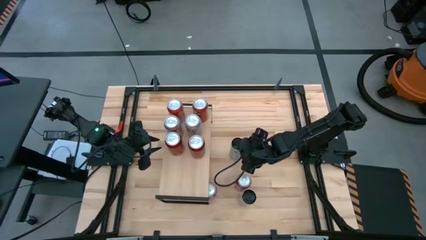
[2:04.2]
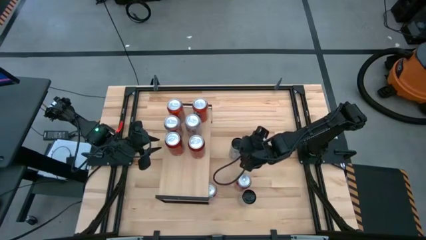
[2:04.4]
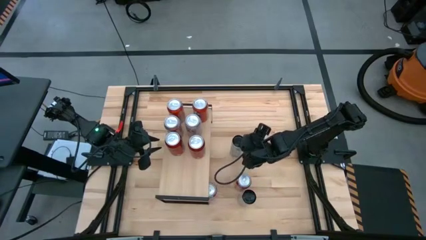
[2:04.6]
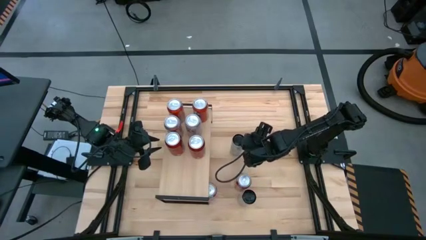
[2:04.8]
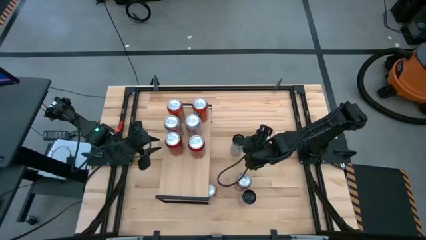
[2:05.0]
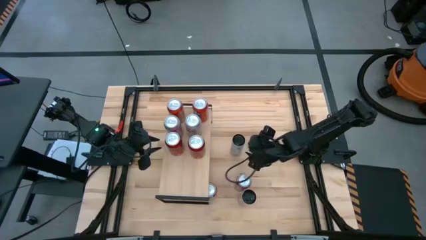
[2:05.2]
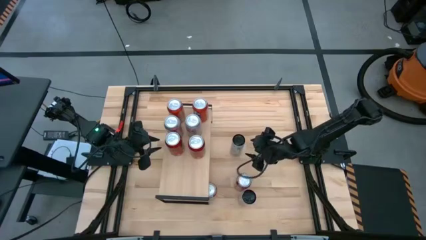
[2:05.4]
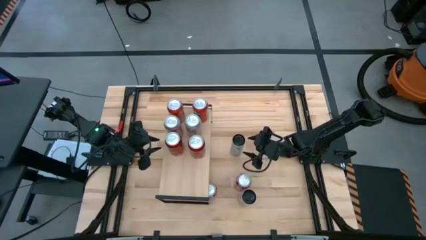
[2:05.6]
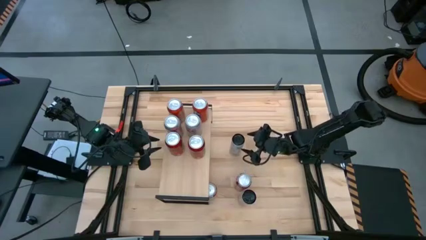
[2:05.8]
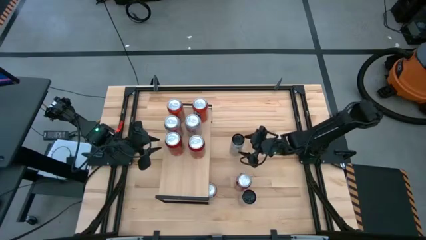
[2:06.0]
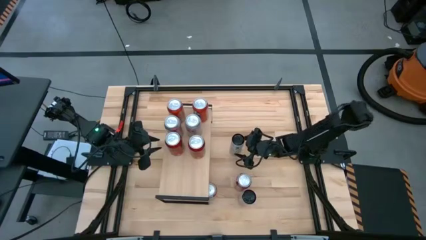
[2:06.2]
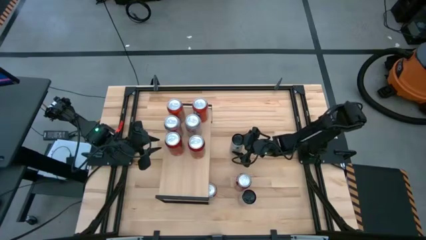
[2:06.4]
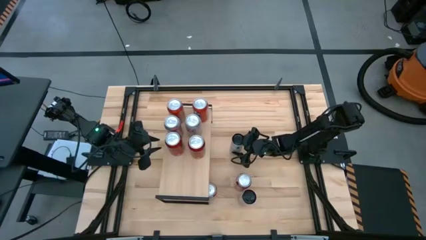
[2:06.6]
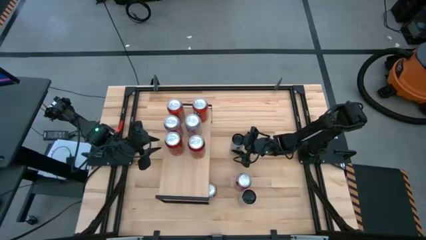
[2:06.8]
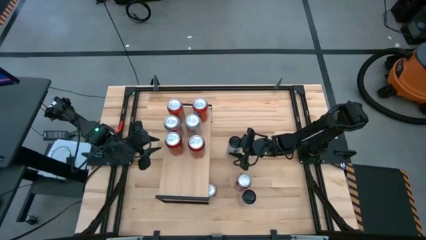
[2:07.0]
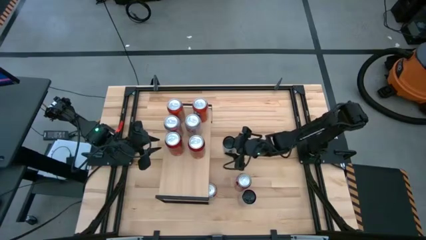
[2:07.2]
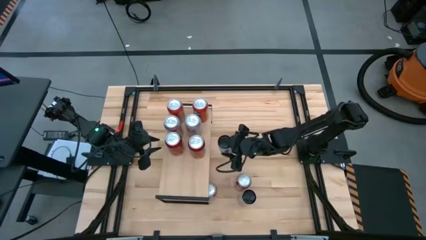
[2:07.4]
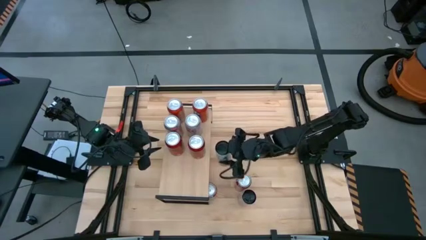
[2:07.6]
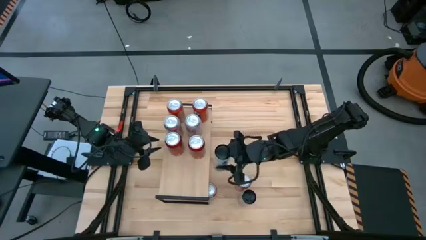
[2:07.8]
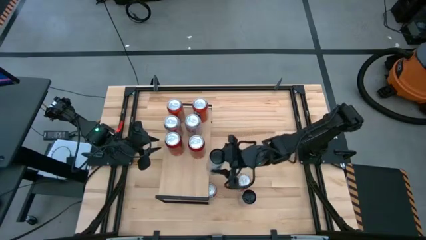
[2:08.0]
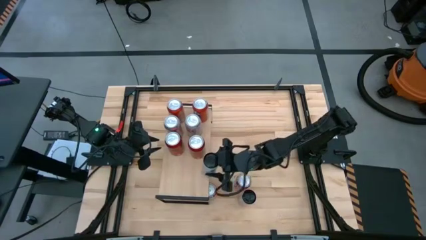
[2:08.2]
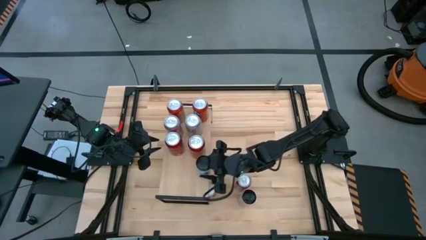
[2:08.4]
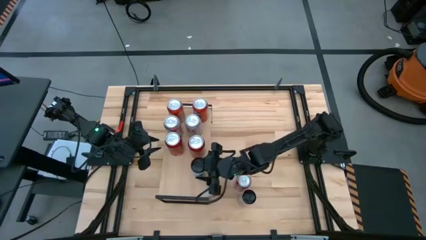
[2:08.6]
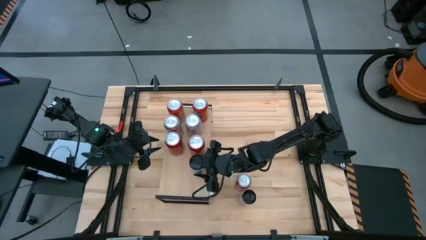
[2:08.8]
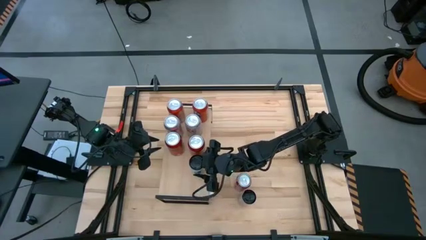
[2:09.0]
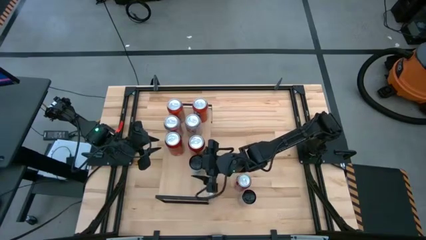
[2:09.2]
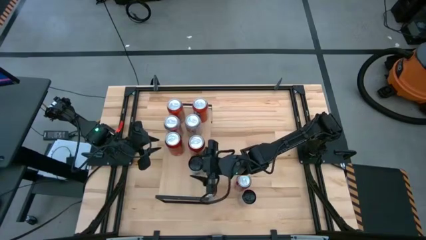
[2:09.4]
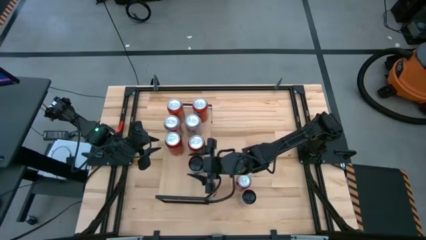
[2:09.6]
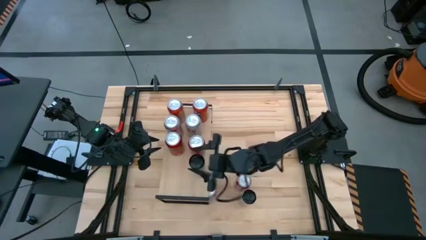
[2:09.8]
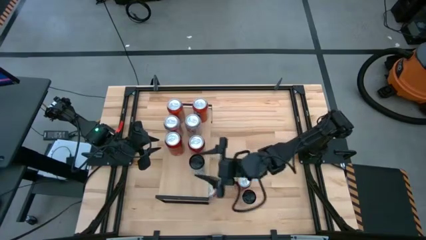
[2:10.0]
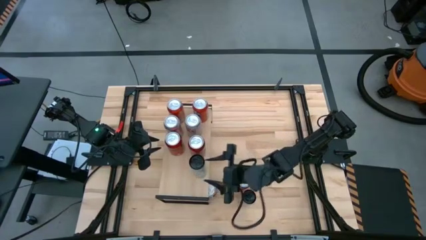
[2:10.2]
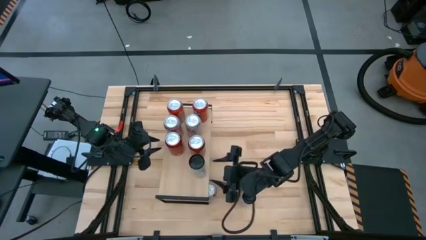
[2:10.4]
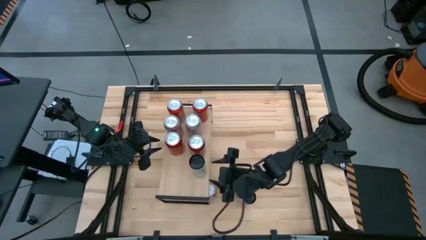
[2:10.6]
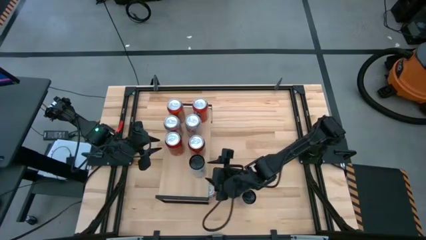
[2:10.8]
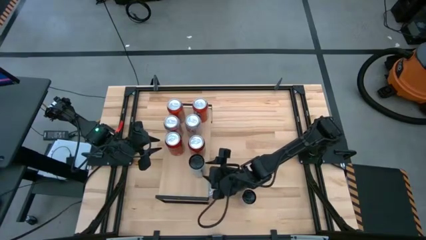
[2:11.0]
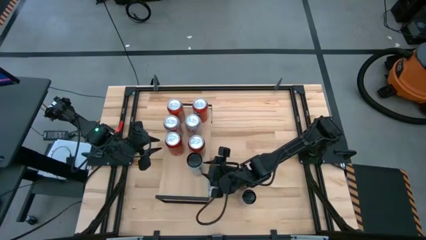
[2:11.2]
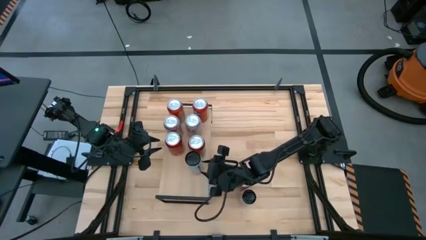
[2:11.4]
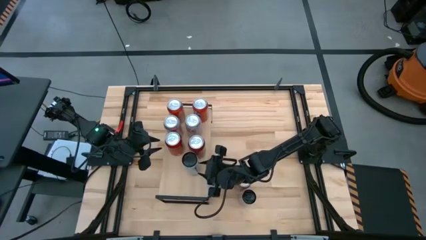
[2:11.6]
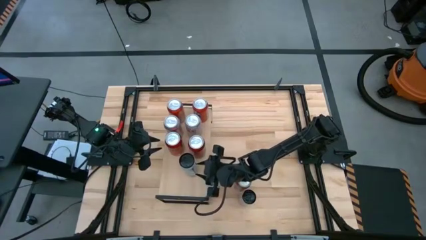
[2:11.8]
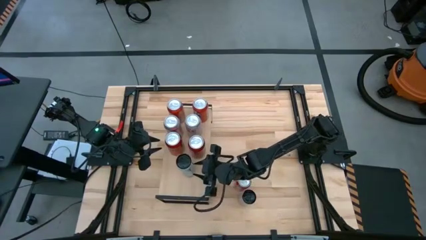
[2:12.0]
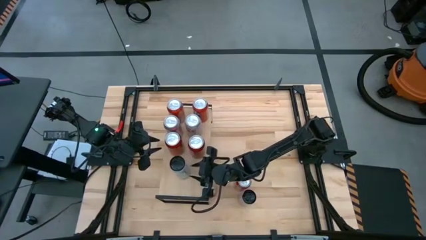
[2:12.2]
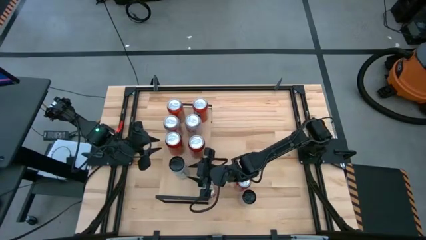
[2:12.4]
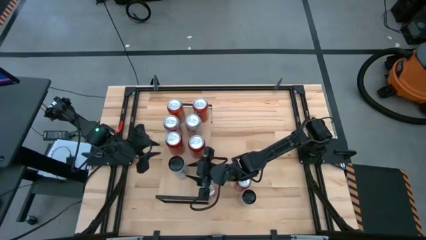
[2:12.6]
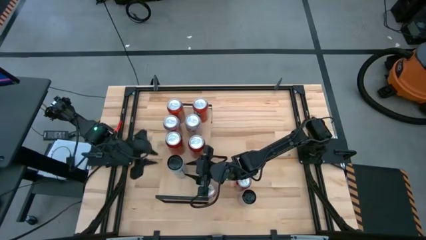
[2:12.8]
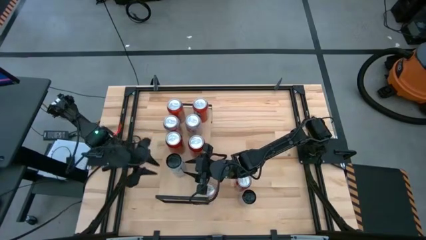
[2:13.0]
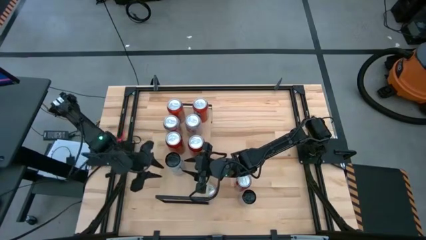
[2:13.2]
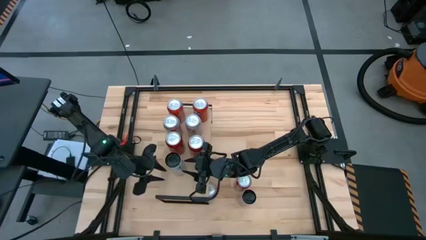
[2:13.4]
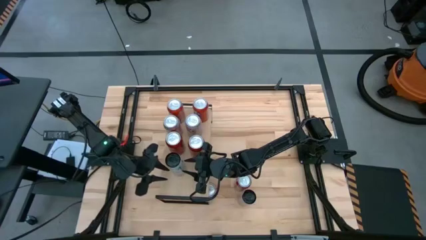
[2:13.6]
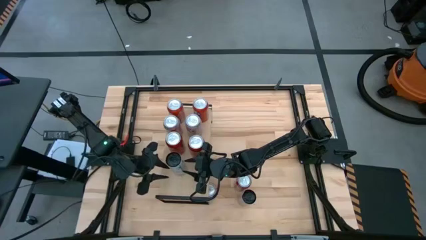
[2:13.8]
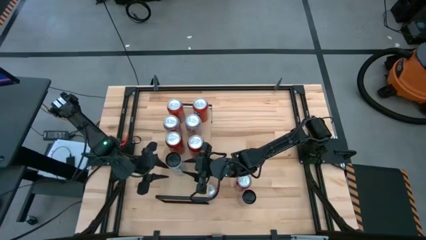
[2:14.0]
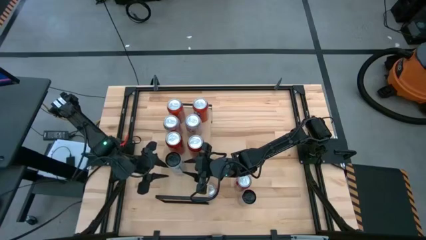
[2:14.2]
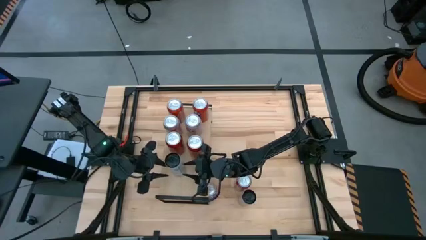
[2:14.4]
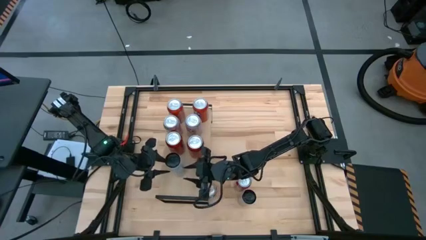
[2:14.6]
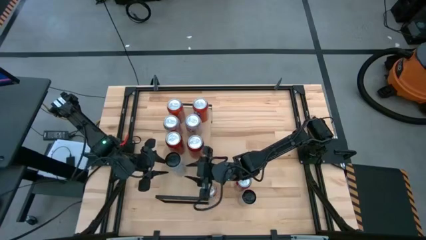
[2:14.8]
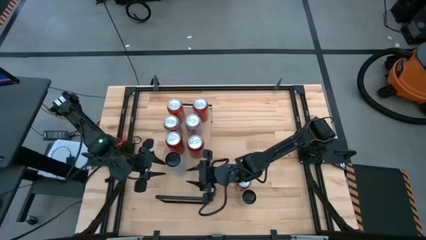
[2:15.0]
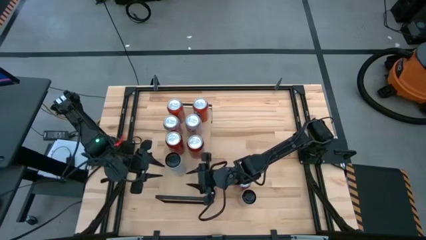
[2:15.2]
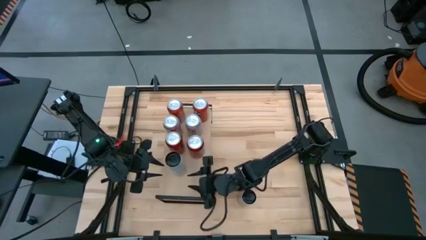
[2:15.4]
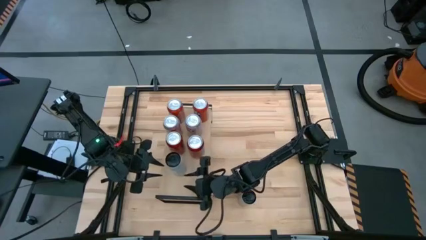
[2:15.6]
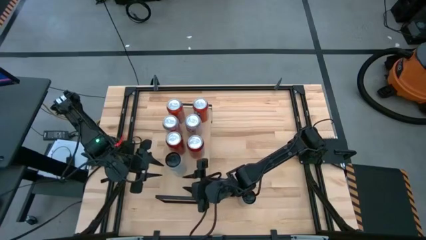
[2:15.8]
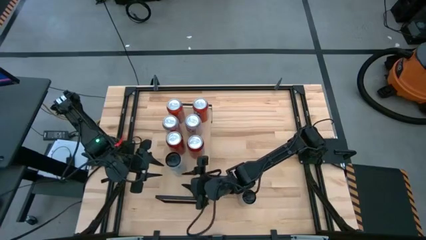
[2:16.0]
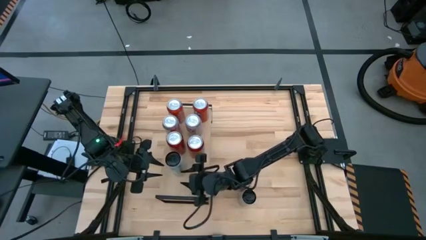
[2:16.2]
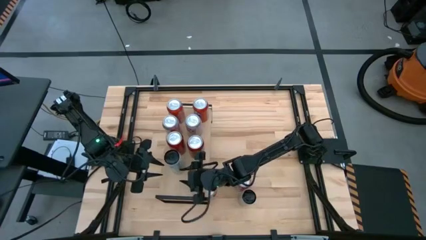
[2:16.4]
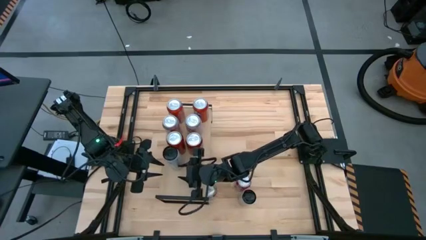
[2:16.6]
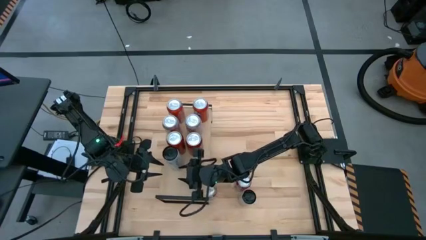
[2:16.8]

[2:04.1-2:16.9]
Task: Place canned beverage on shelf
Put the left white yellow soda can on the shelf

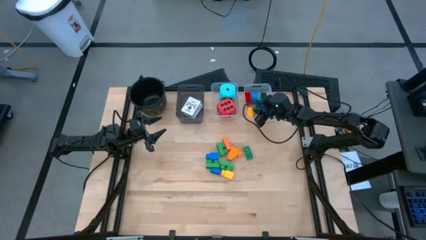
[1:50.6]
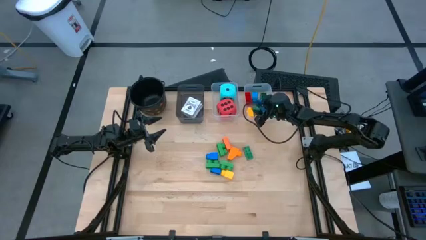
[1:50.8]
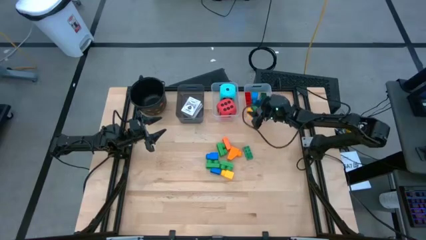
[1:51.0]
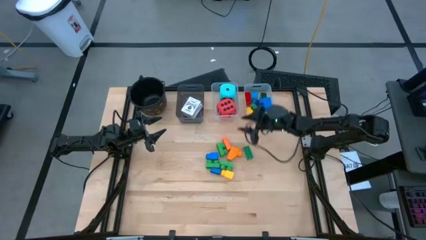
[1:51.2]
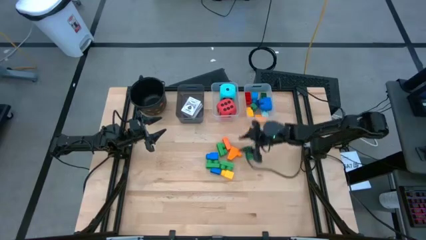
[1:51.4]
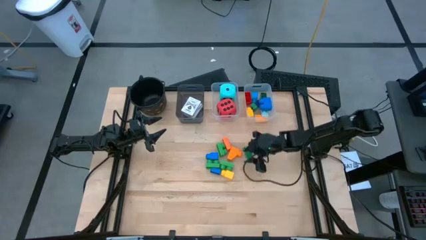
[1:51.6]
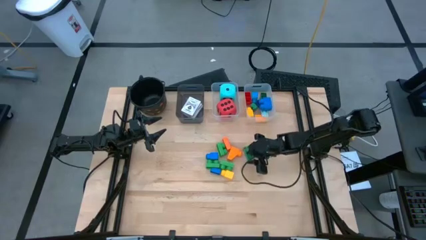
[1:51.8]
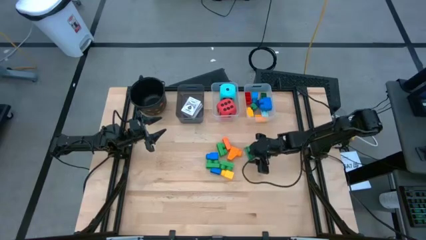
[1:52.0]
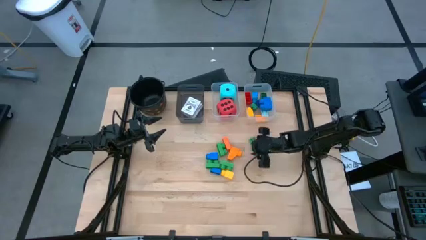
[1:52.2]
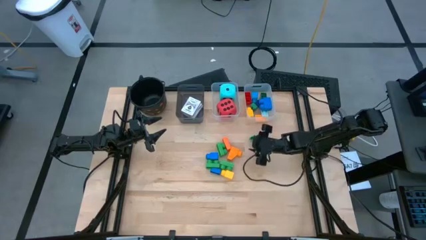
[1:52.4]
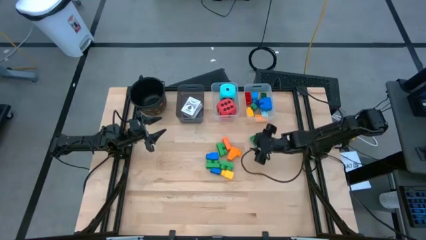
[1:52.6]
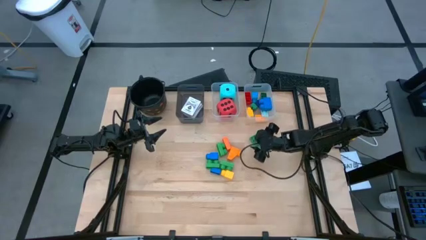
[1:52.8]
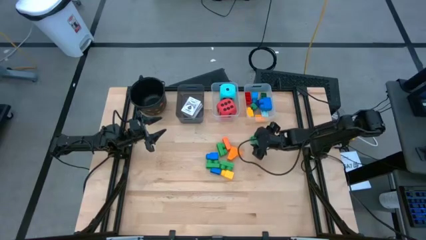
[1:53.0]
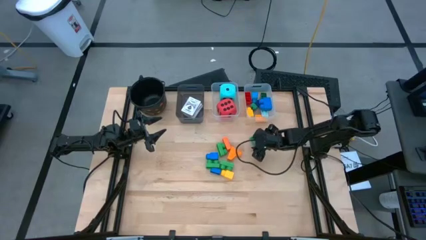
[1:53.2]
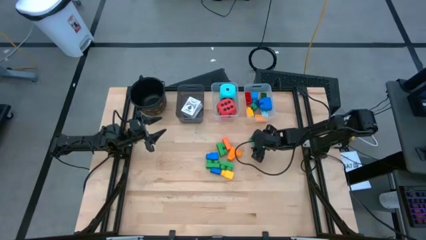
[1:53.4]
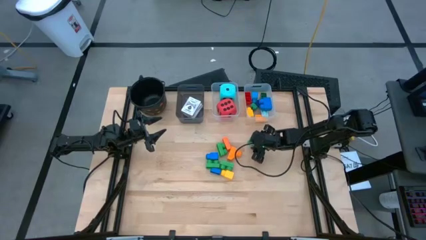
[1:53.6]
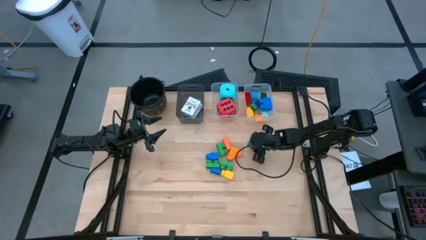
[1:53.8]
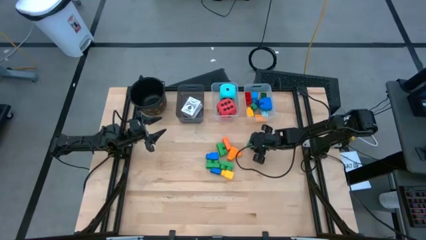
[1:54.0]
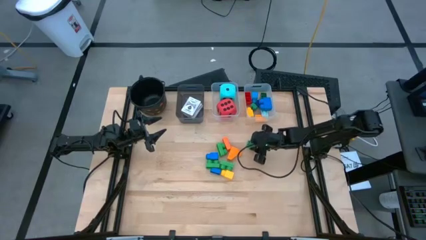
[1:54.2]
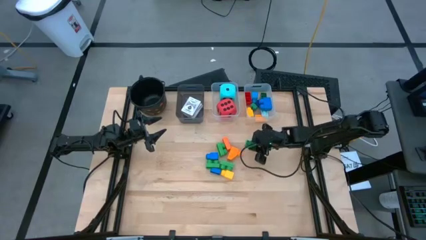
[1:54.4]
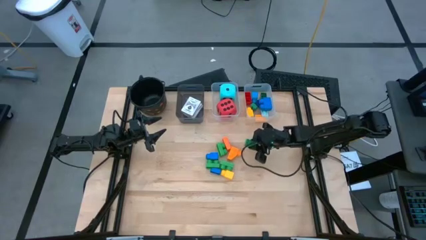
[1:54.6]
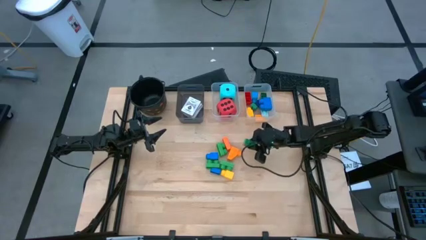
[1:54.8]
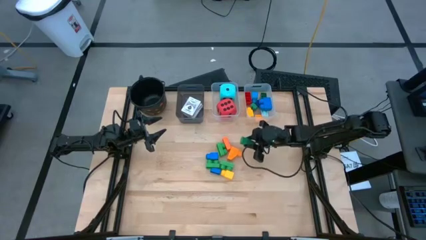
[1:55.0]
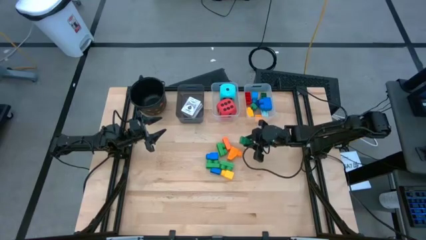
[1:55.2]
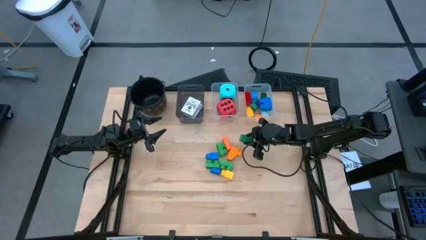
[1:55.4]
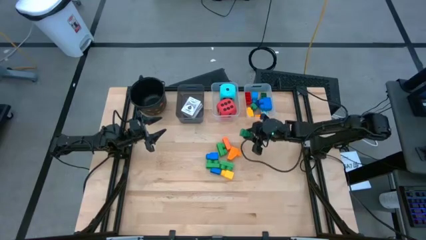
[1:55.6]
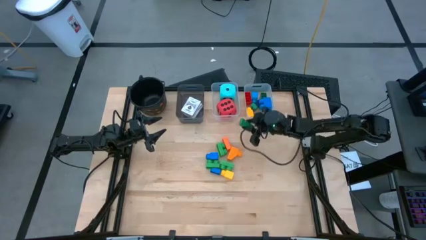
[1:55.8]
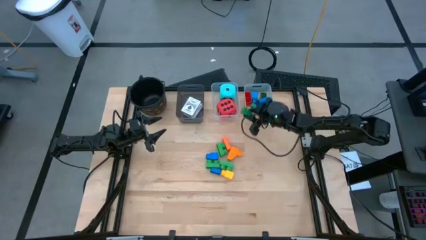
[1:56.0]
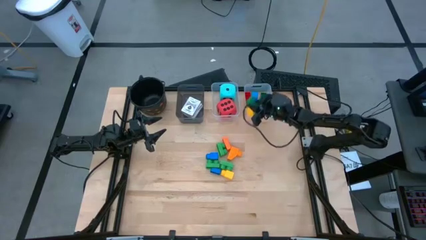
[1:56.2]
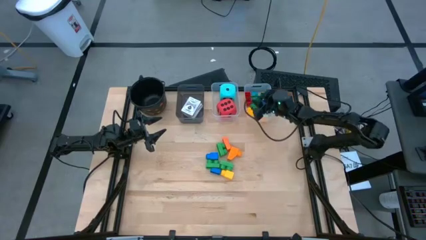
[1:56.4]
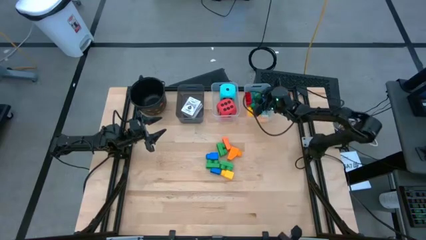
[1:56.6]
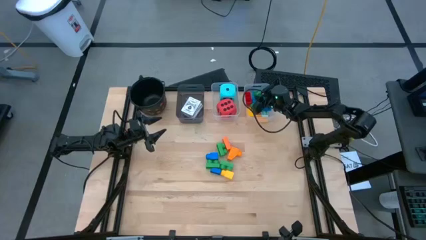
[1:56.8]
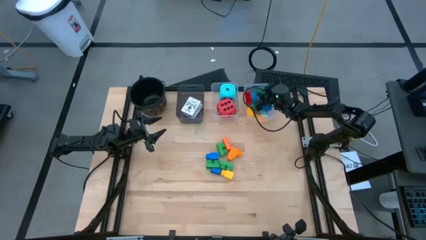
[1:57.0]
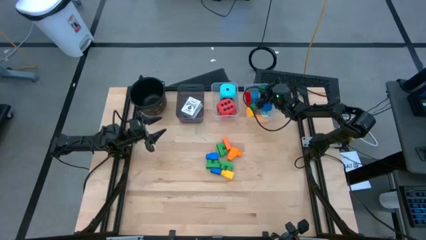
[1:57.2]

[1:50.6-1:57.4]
Task: Pick & Place Toys
Put the green block into the right transparent bin
